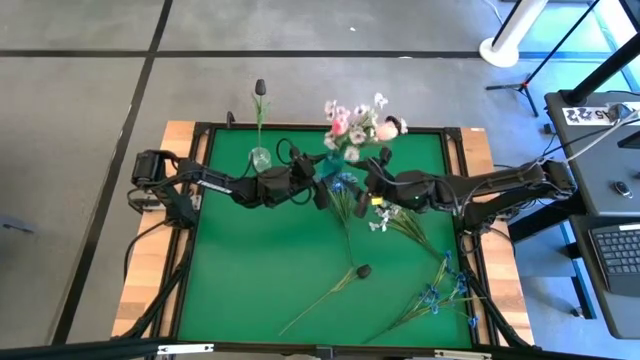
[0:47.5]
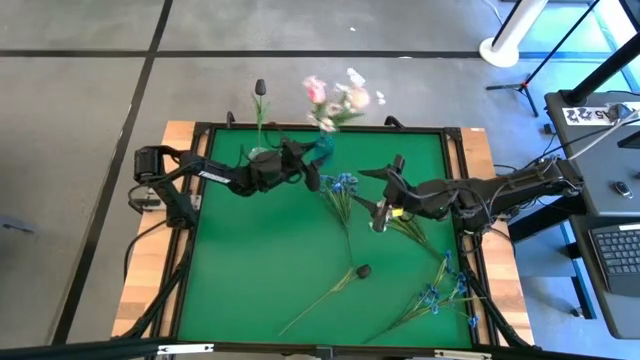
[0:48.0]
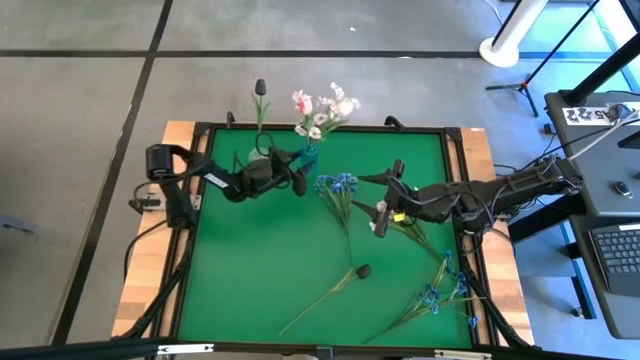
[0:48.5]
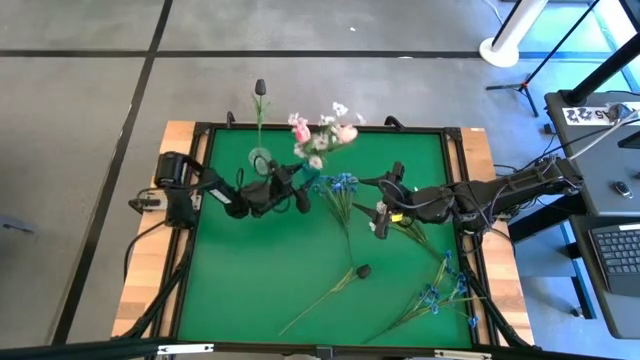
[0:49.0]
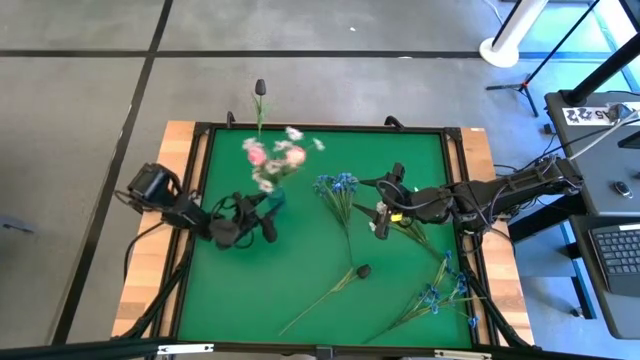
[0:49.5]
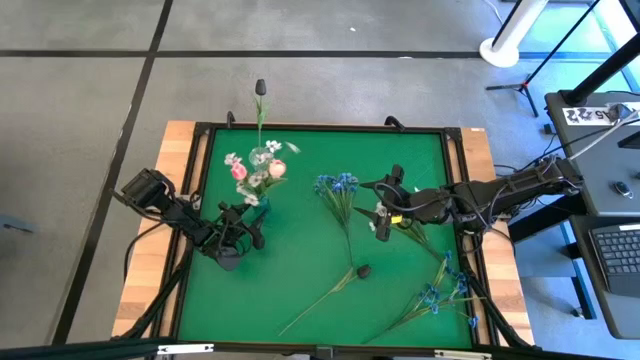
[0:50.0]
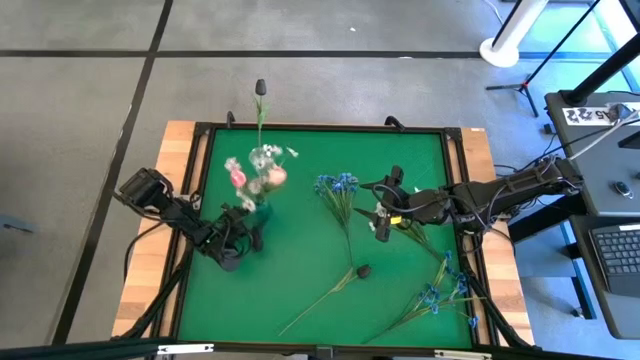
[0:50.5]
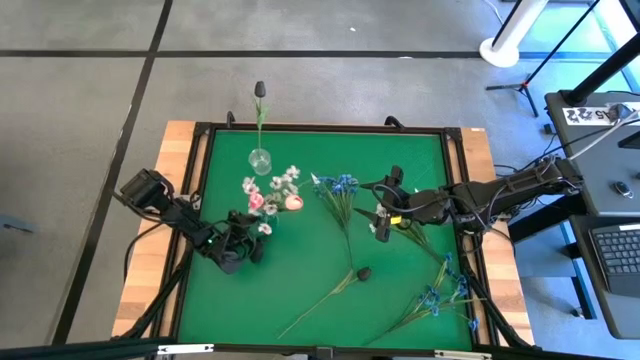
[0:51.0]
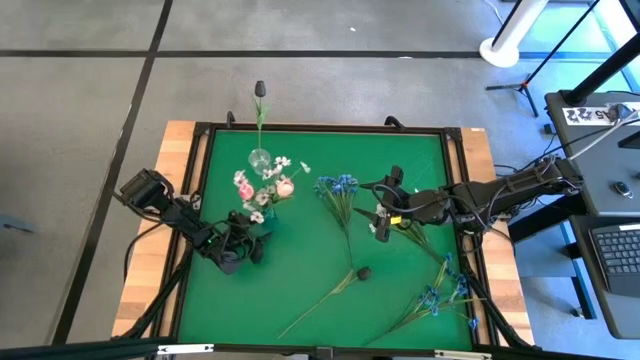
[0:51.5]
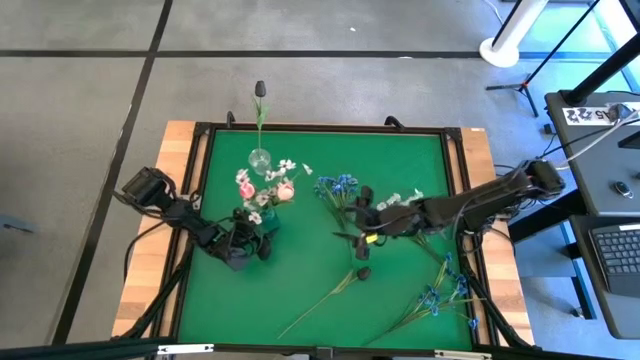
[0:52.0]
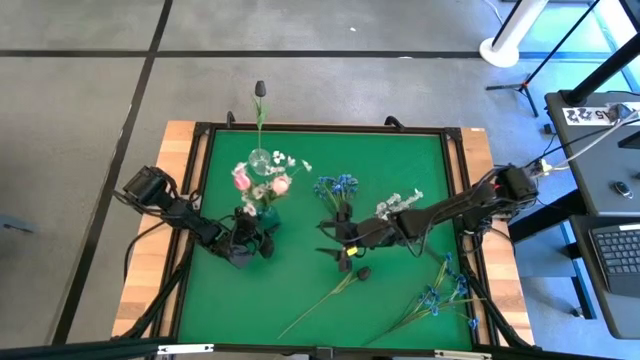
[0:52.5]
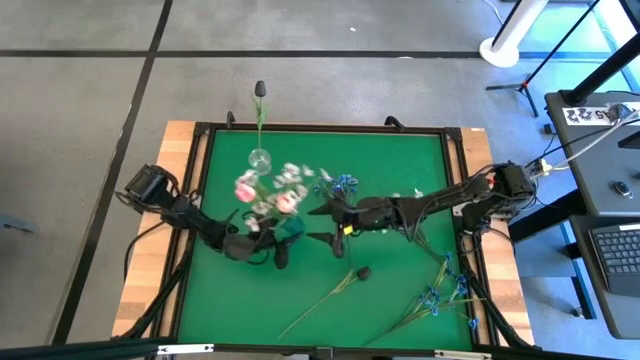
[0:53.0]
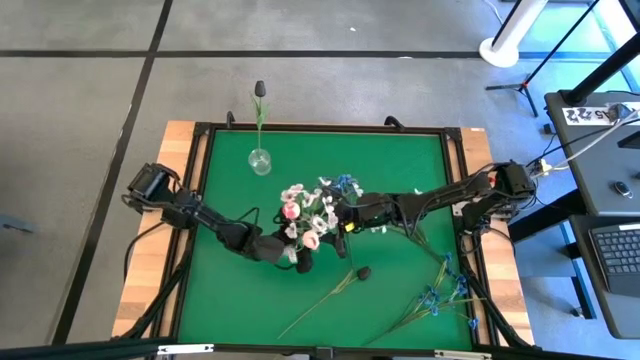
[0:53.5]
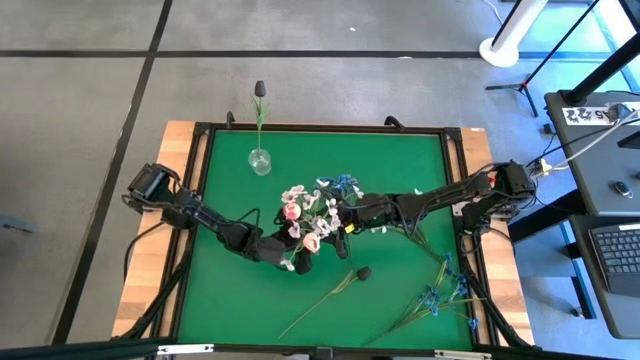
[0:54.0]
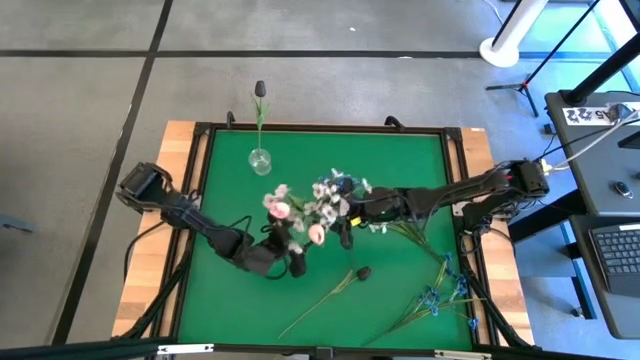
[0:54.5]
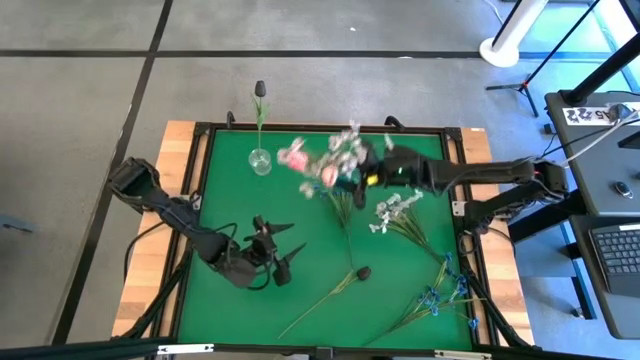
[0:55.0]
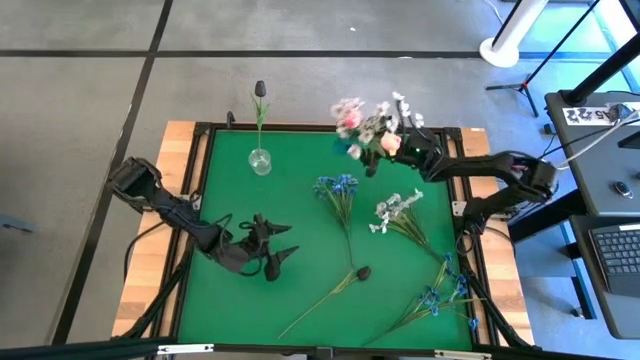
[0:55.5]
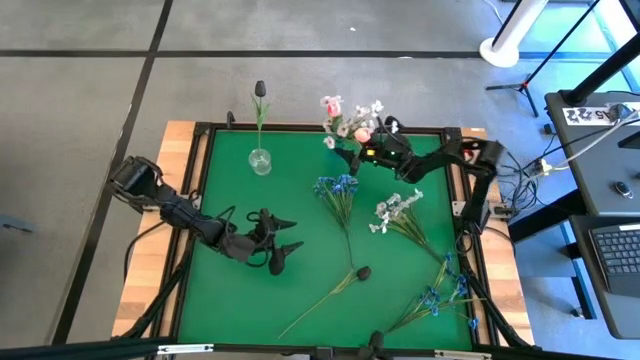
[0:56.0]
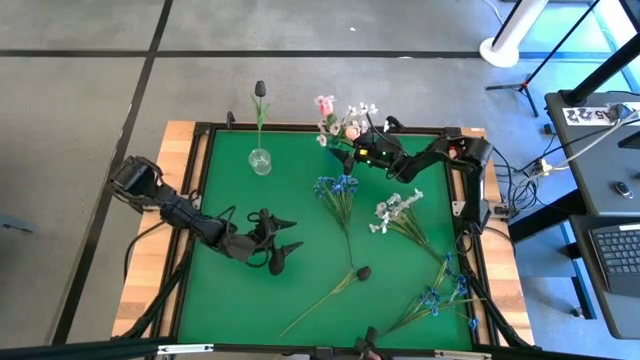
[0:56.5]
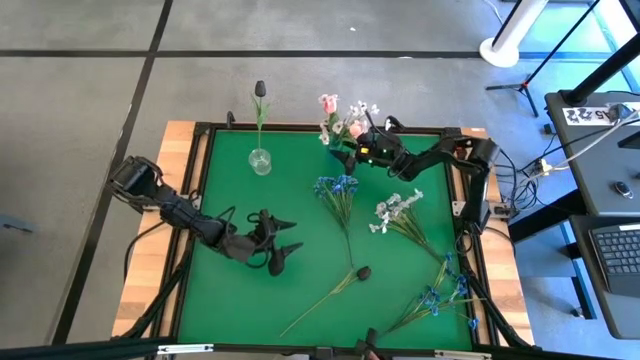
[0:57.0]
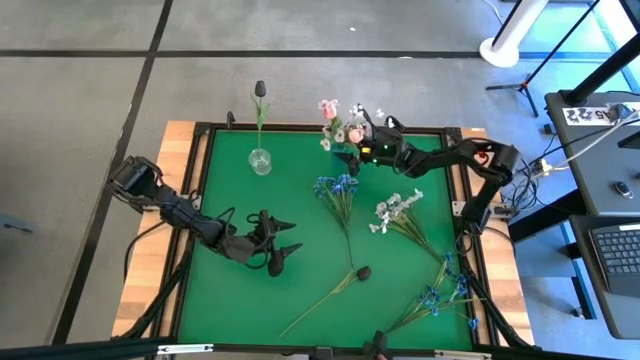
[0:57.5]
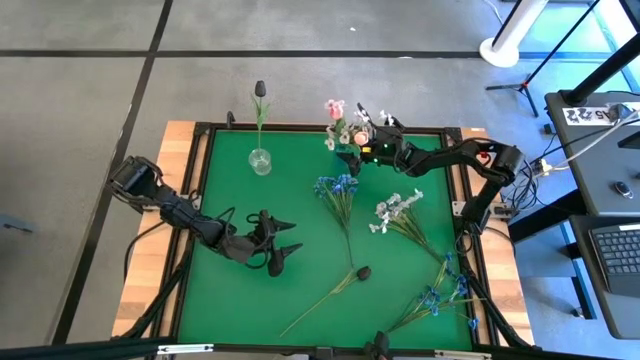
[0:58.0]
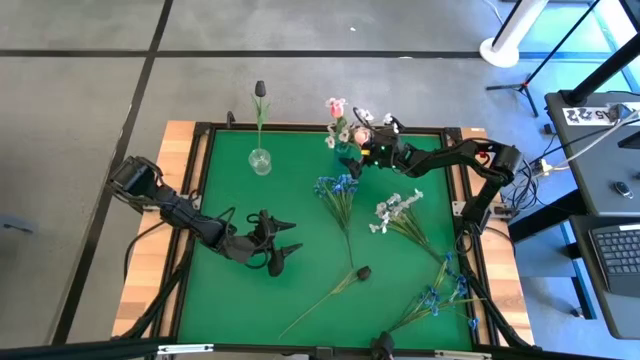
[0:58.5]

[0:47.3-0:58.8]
Task: Sort flowers into vase by color
Adjust the blue vase

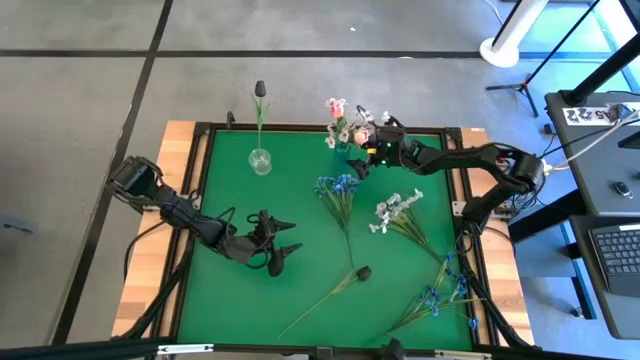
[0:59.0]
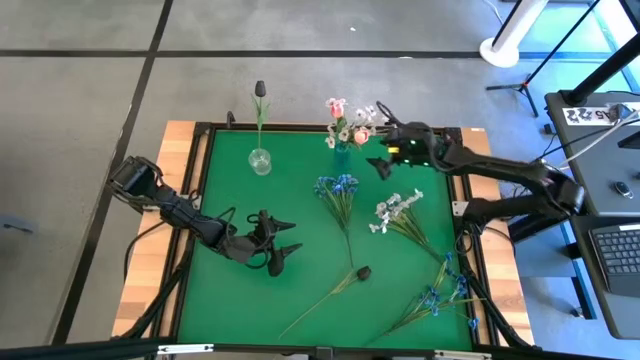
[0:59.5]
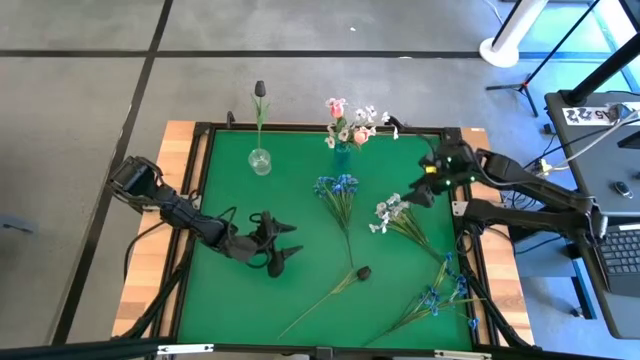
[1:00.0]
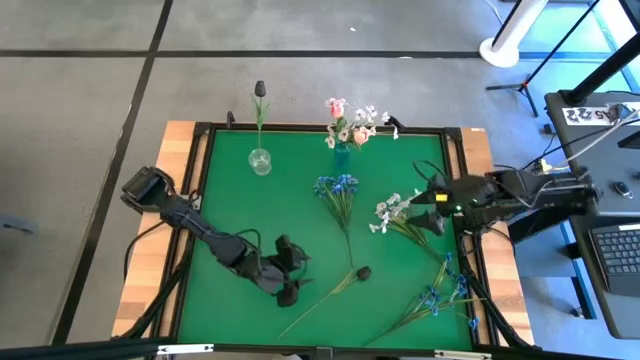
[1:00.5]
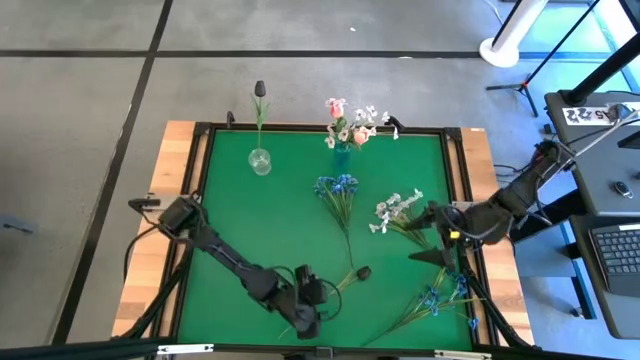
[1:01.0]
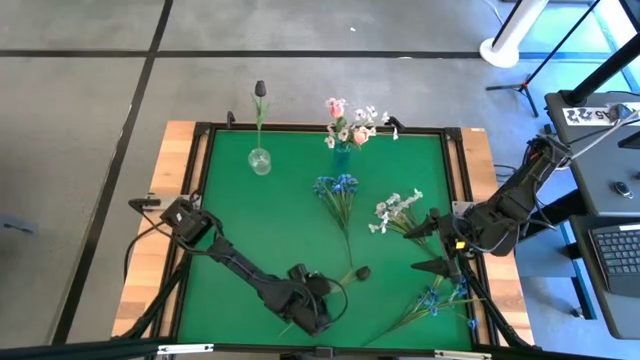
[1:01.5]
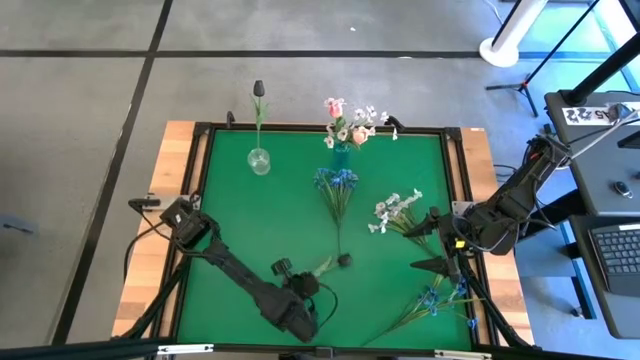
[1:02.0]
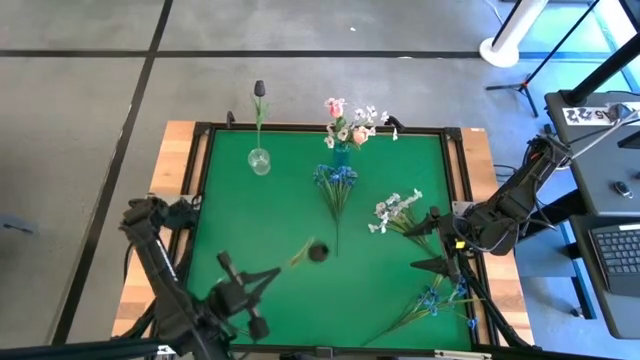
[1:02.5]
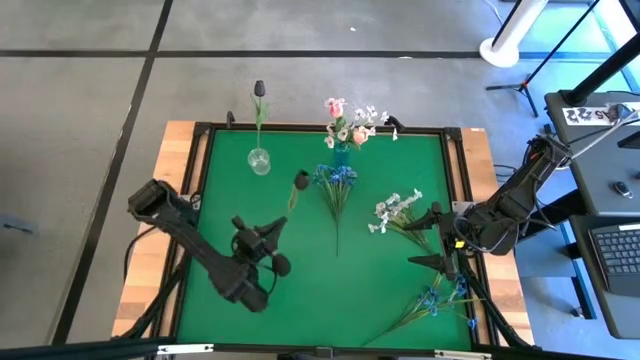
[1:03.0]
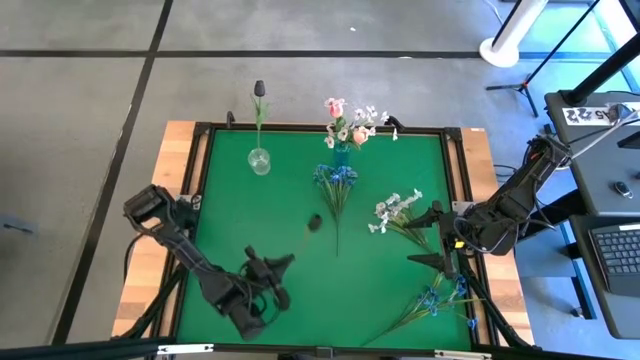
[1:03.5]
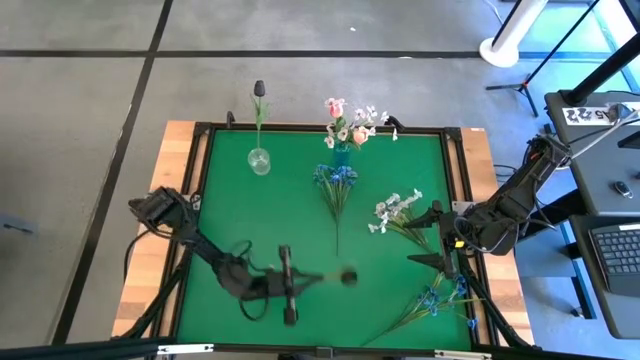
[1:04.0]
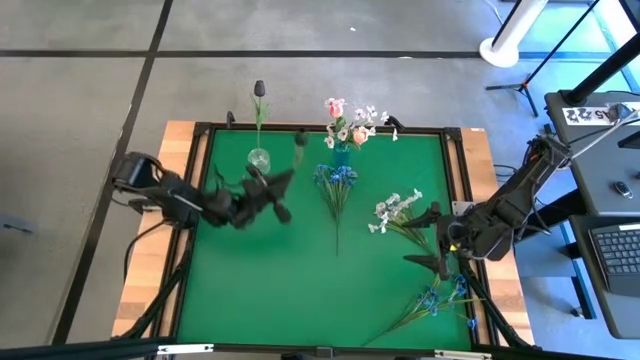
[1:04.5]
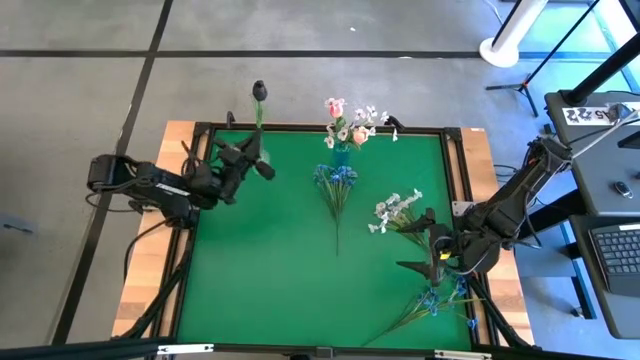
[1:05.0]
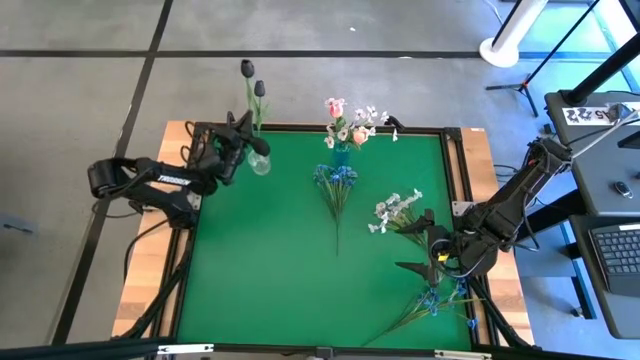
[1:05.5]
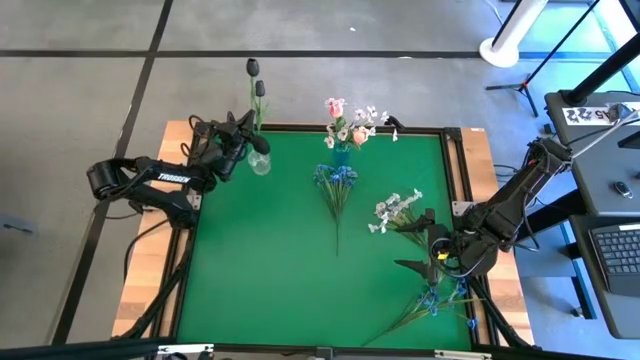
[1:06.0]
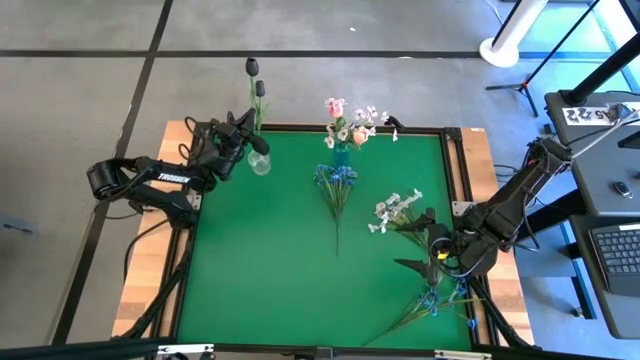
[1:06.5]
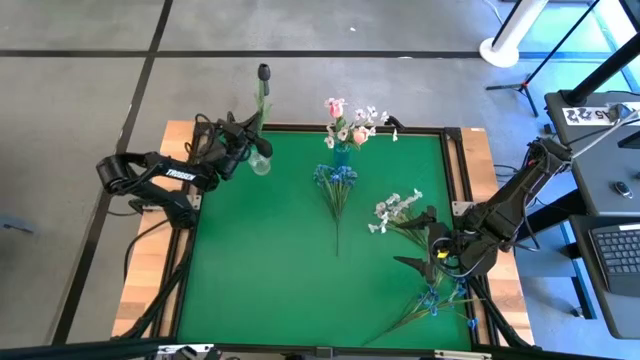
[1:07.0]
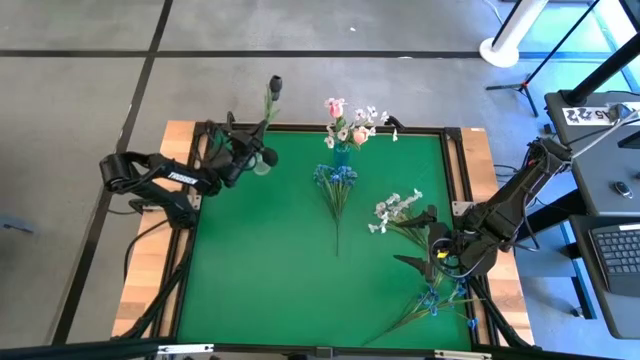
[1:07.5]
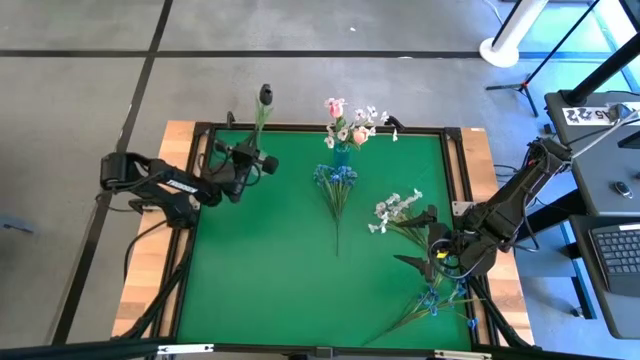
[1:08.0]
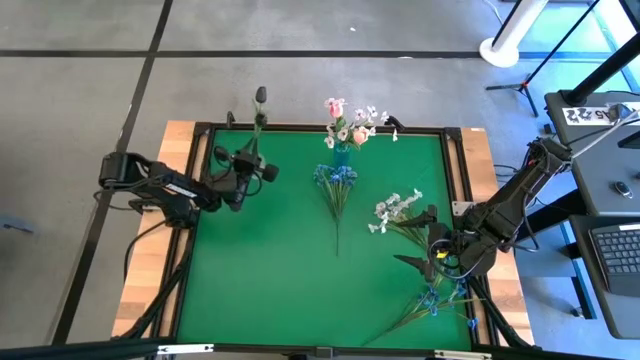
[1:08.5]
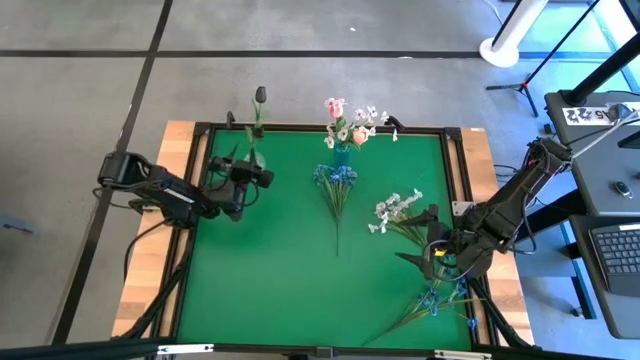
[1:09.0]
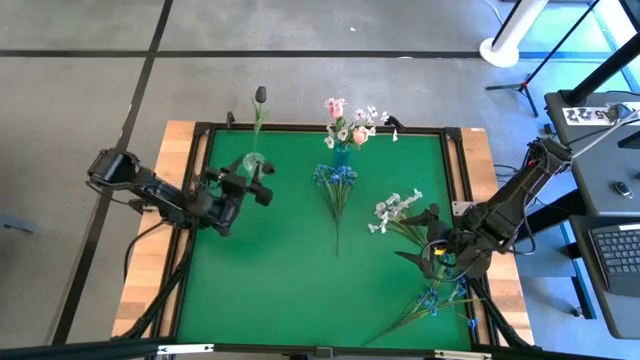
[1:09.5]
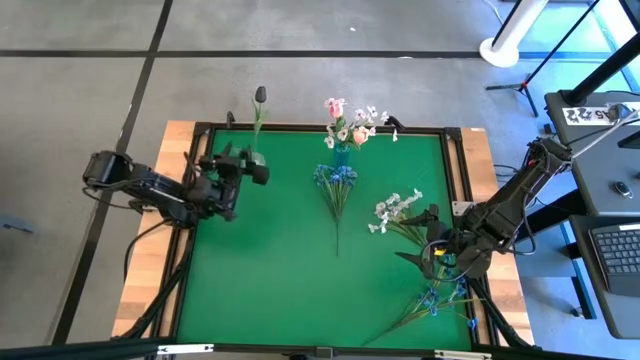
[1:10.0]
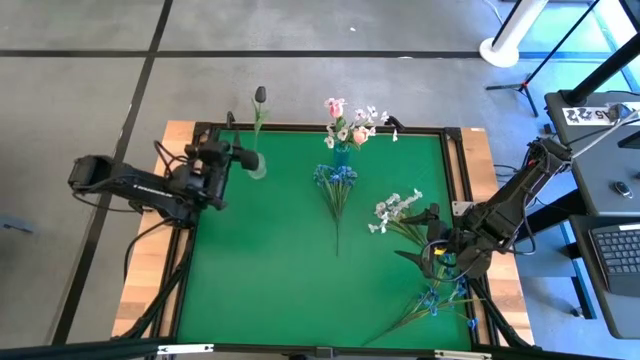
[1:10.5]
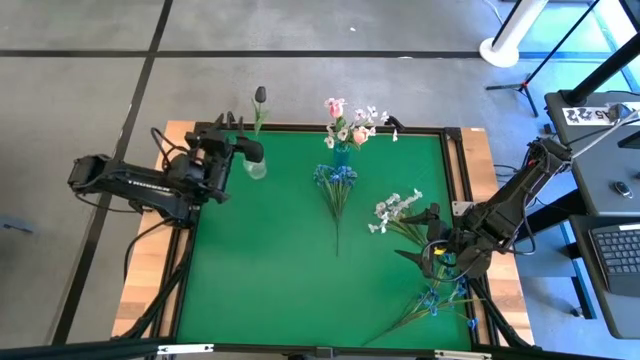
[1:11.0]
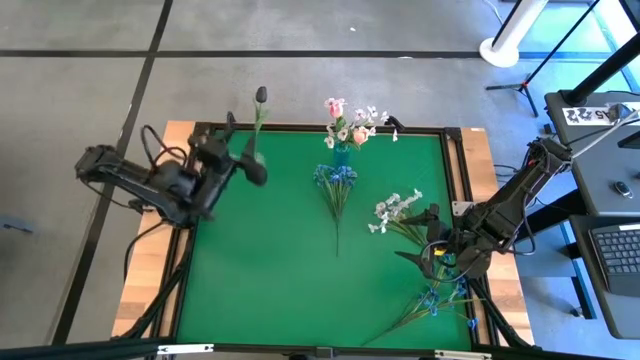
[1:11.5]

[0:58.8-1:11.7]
Put the black tulip into the transparent vase
